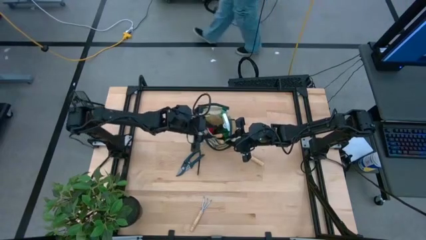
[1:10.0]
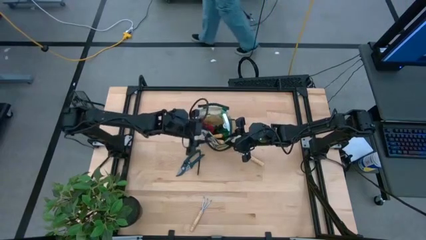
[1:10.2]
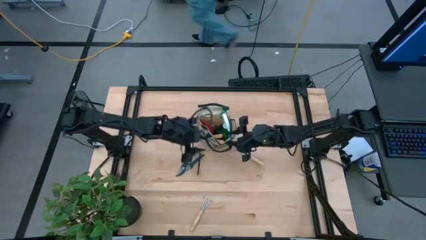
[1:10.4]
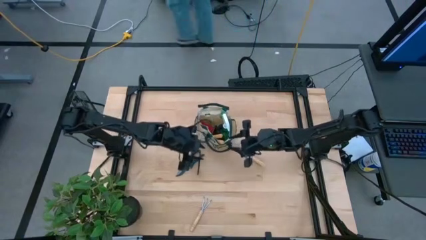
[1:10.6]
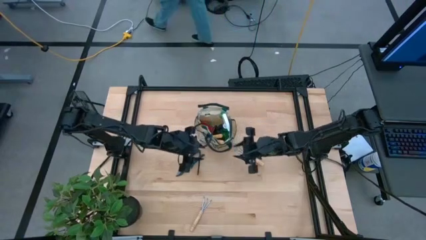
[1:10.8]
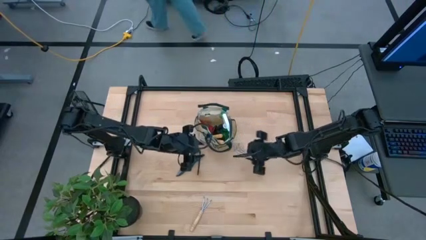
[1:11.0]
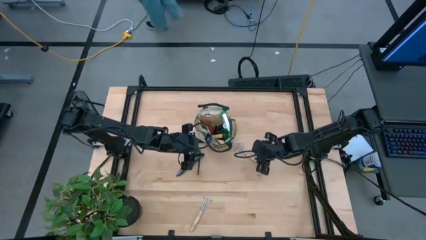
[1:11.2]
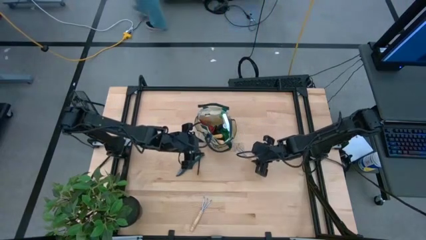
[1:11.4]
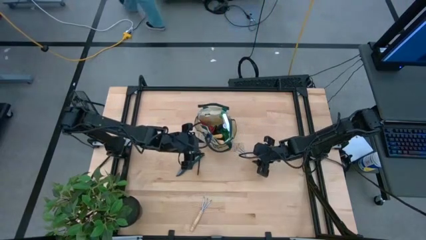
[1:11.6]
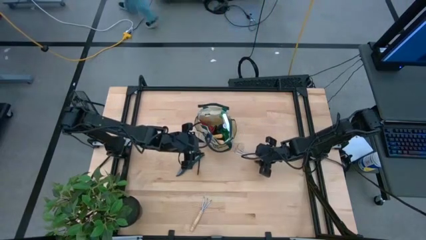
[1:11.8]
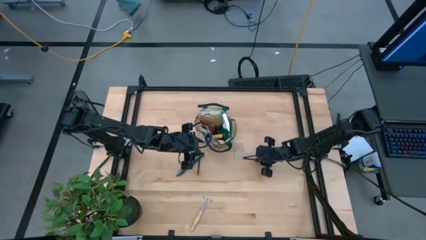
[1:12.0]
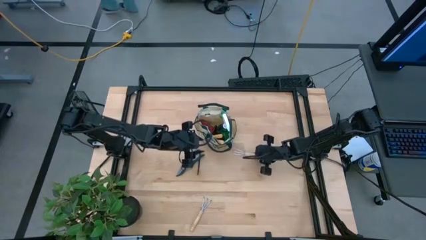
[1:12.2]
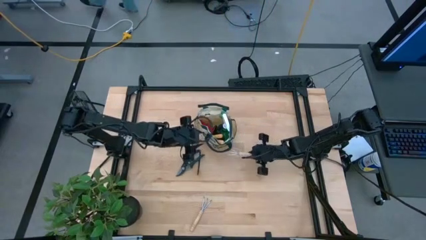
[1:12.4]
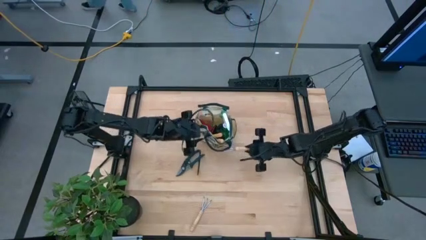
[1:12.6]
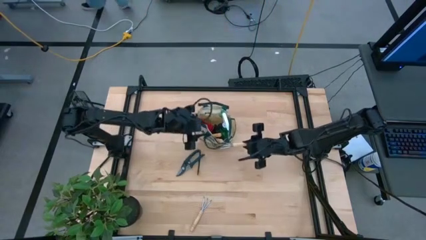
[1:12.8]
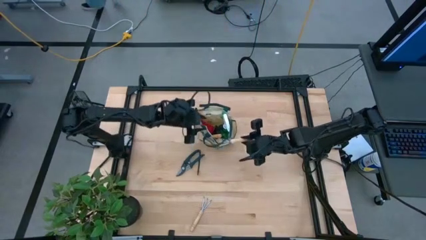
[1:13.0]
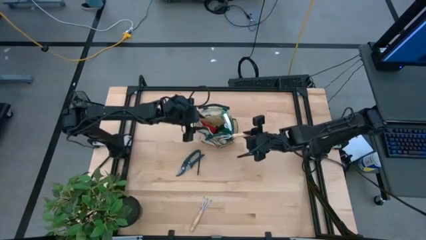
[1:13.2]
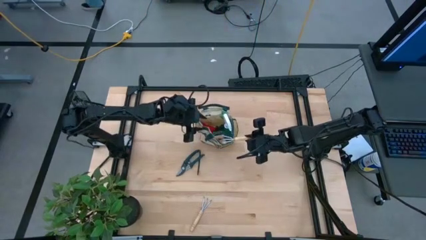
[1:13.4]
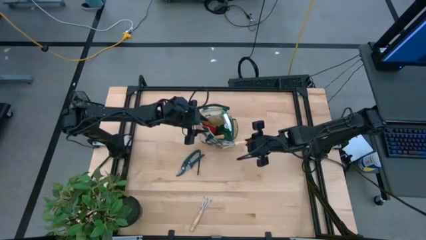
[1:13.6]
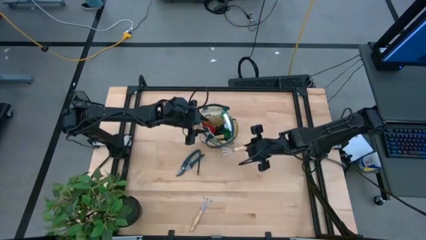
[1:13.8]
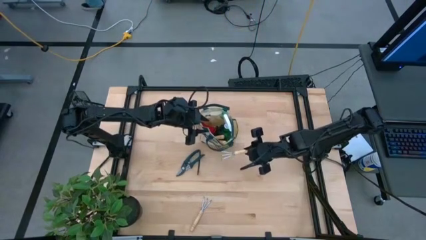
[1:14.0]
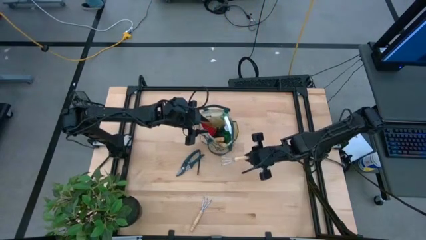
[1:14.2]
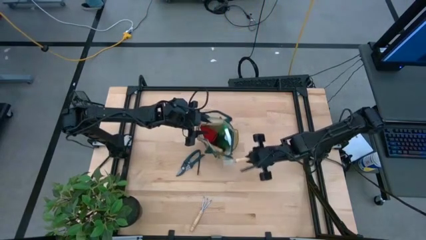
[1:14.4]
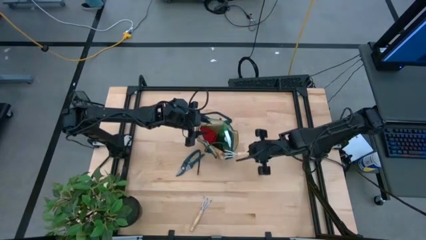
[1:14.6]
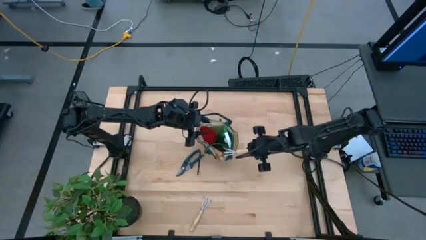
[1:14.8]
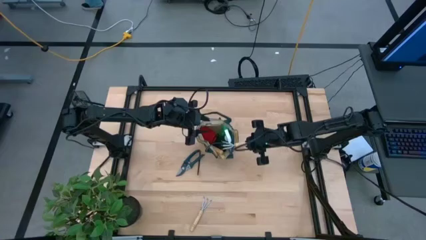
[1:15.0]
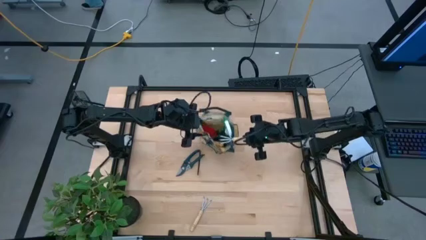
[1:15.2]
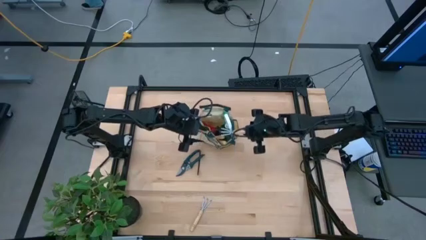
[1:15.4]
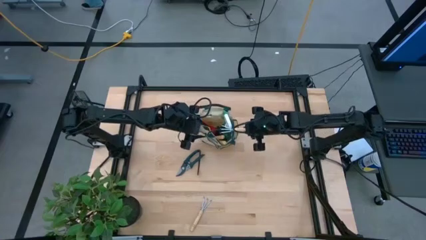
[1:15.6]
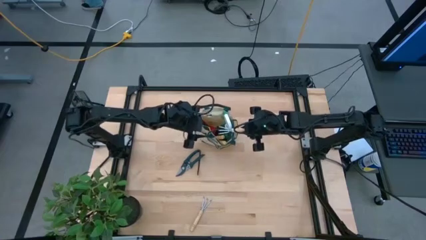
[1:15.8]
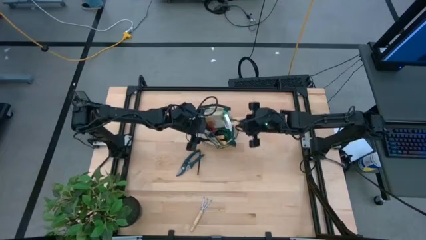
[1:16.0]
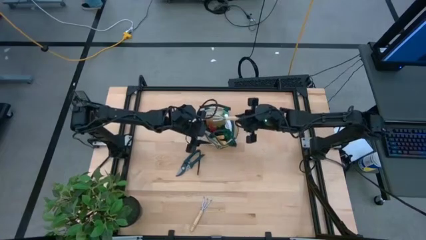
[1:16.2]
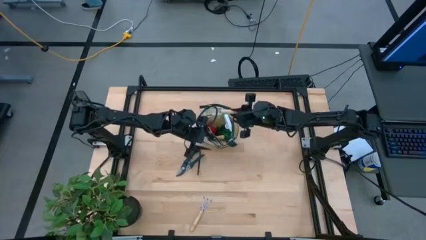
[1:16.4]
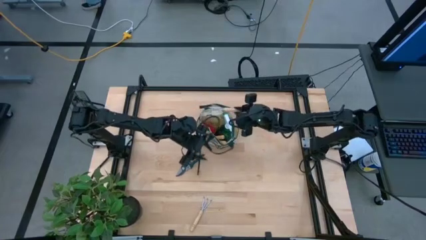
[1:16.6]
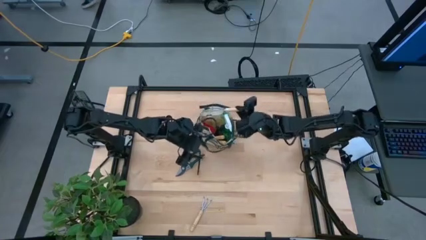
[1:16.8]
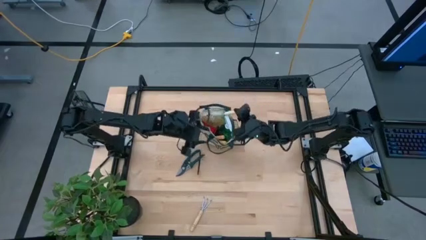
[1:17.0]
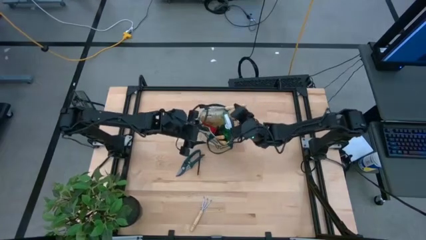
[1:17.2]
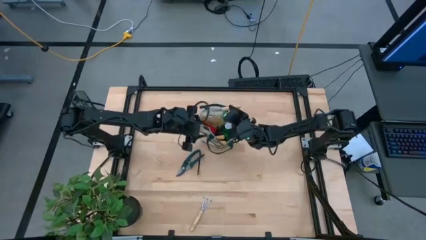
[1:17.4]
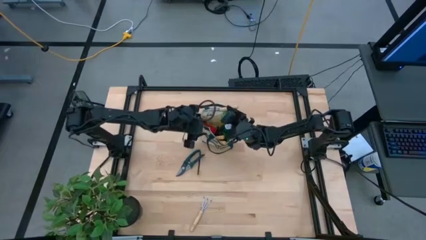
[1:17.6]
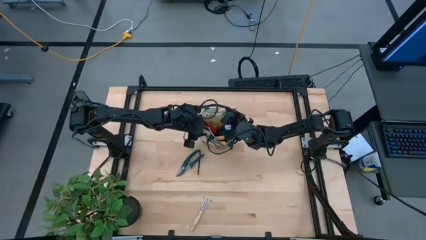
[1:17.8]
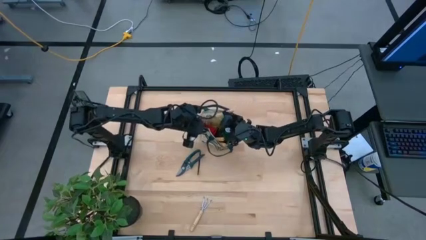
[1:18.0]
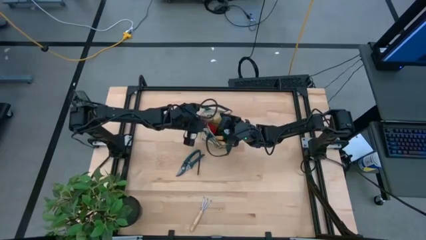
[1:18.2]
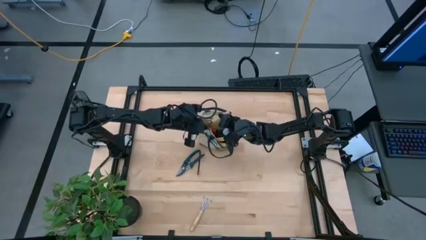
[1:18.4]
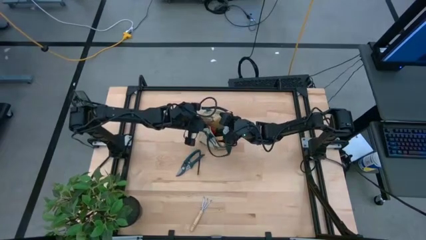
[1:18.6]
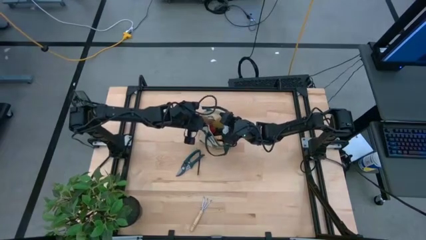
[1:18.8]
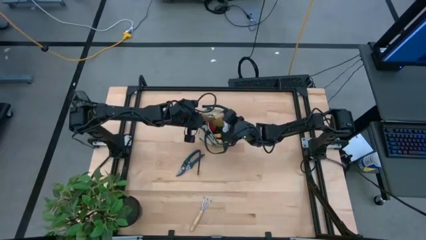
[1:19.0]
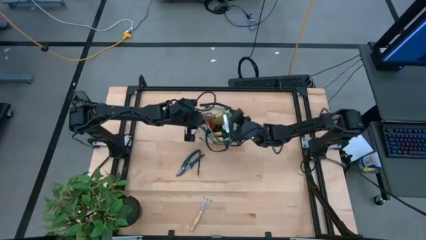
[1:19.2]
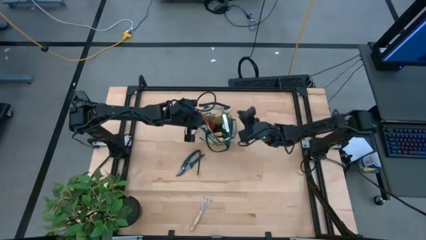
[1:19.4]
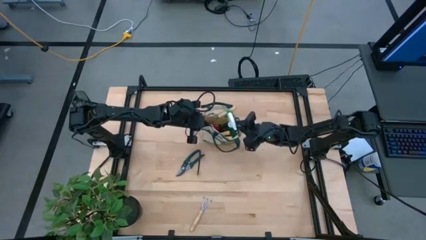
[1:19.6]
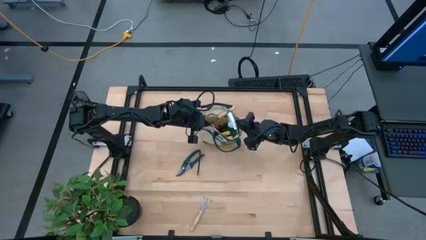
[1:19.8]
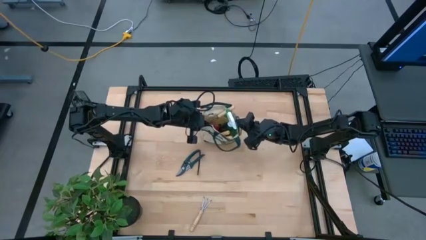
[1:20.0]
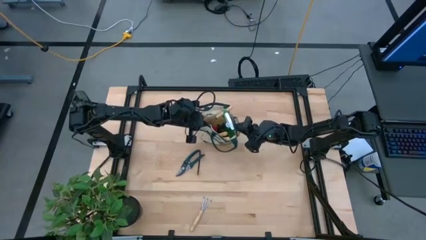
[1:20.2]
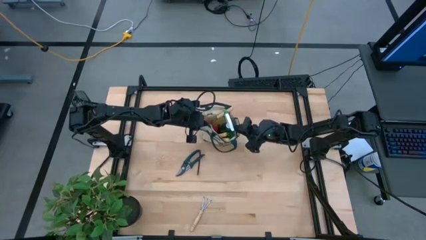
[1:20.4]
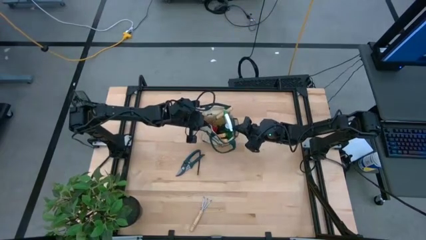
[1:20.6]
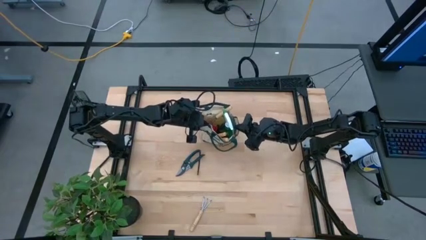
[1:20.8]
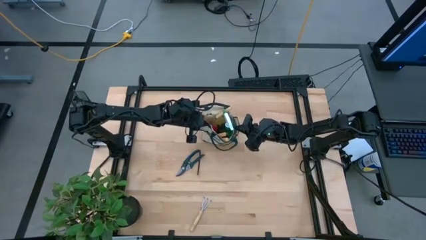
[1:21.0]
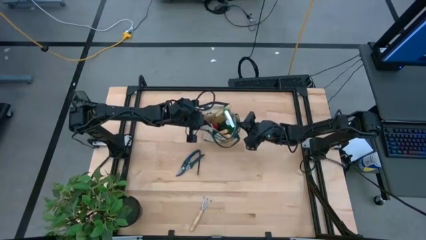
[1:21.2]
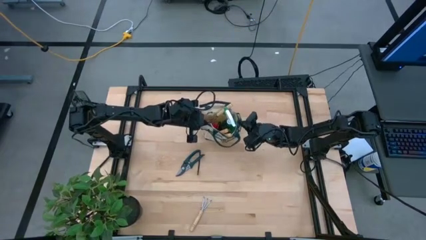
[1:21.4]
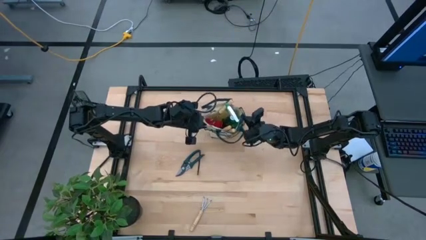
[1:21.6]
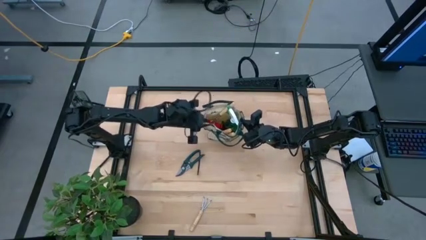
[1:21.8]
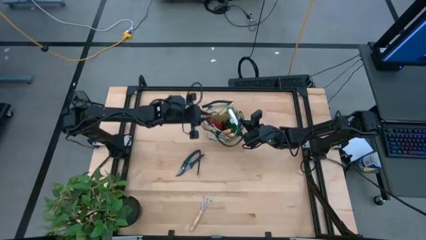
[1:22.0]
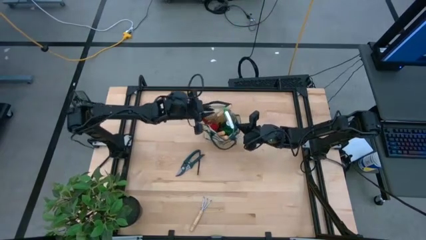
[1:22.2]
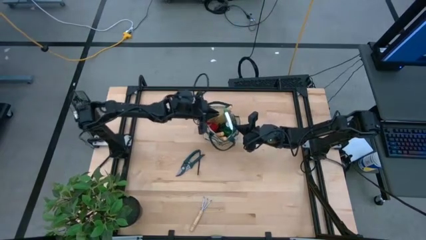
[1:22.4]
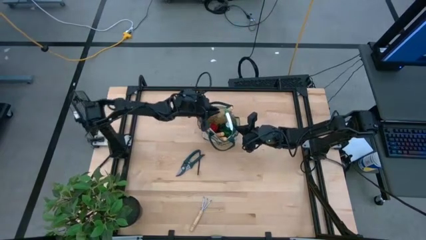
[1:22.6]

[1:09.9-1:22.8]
Task: Pick & Place Garden tools in Gardening bag
Put the top hand rake into the gardening bag
